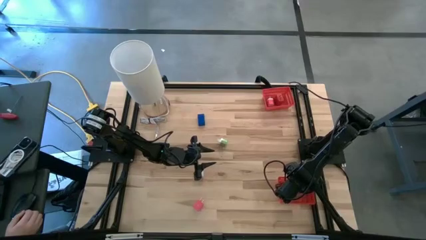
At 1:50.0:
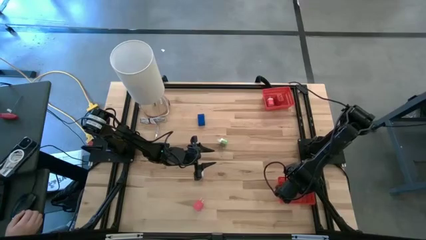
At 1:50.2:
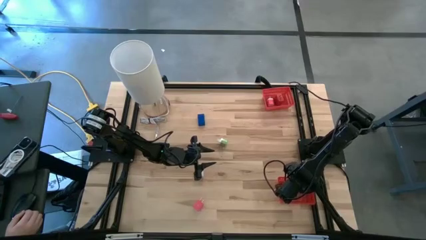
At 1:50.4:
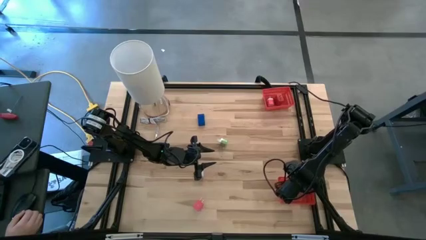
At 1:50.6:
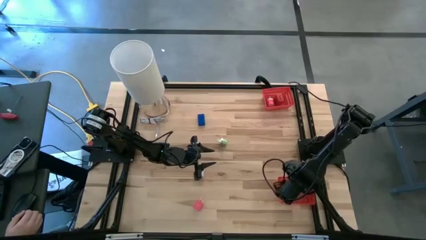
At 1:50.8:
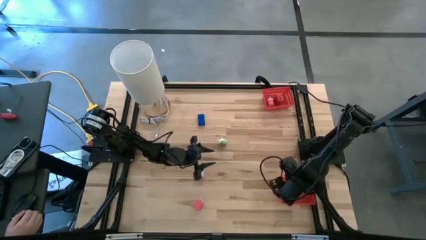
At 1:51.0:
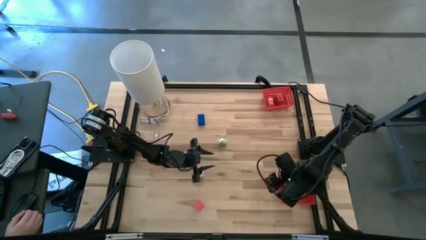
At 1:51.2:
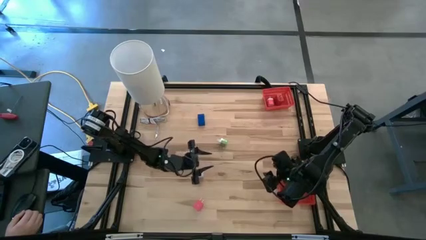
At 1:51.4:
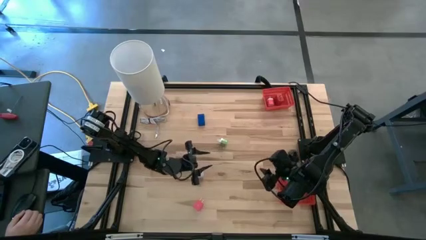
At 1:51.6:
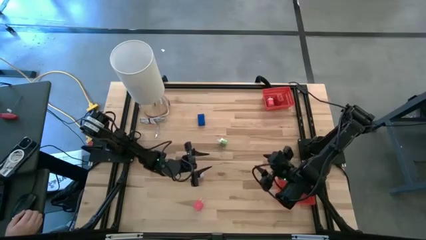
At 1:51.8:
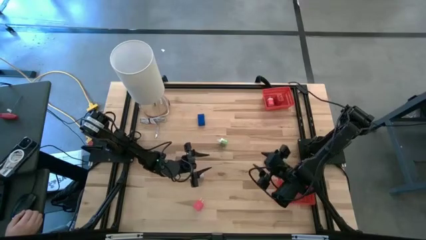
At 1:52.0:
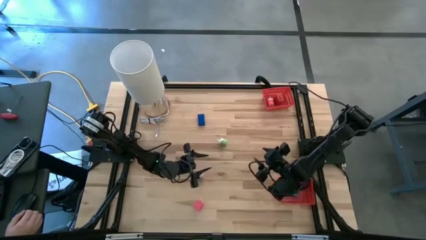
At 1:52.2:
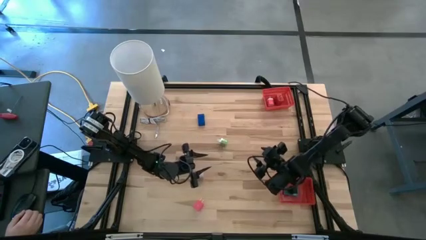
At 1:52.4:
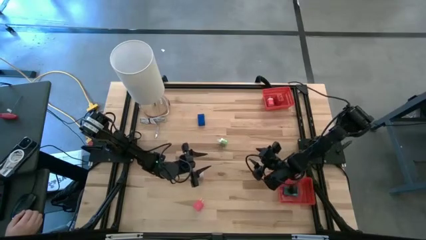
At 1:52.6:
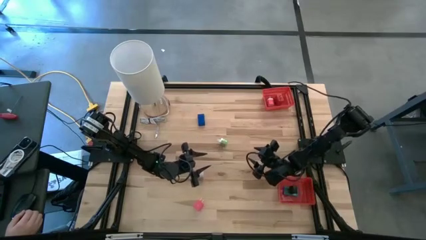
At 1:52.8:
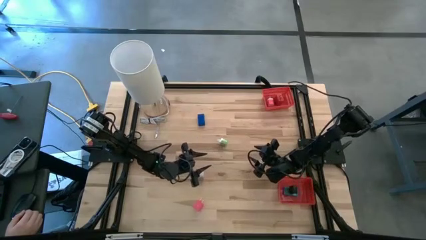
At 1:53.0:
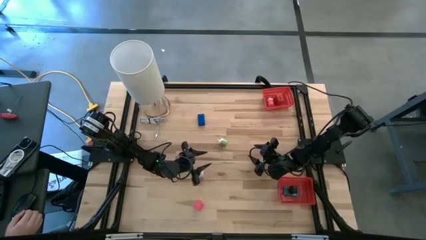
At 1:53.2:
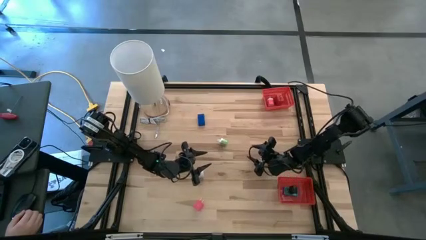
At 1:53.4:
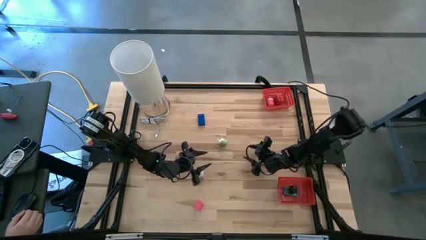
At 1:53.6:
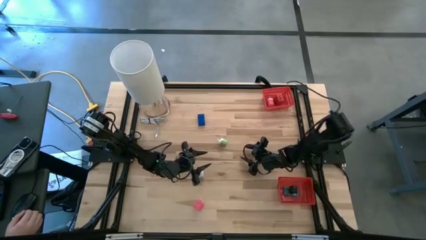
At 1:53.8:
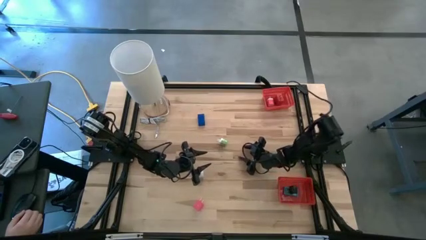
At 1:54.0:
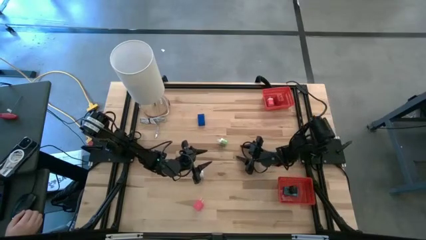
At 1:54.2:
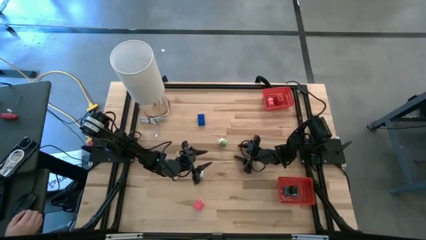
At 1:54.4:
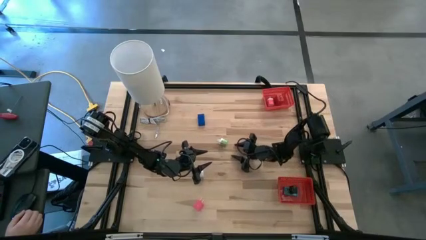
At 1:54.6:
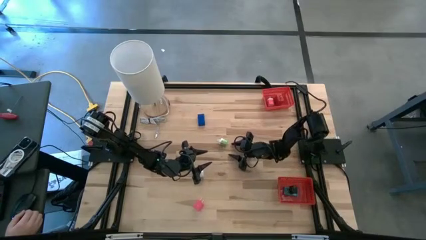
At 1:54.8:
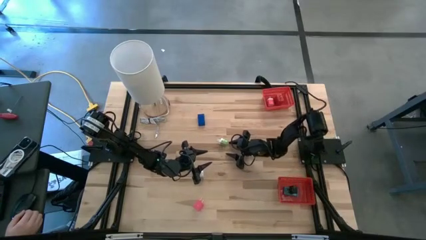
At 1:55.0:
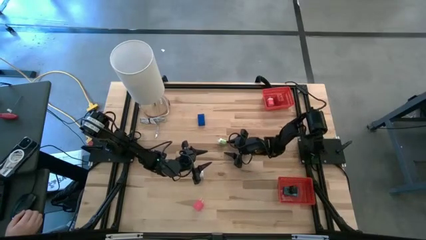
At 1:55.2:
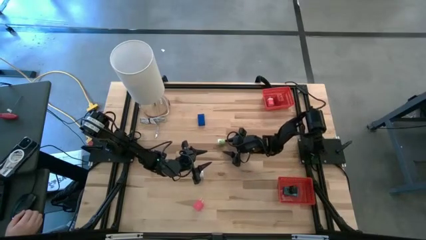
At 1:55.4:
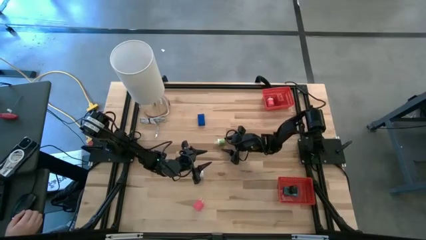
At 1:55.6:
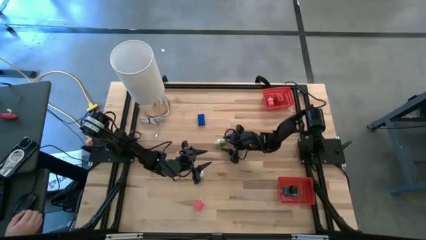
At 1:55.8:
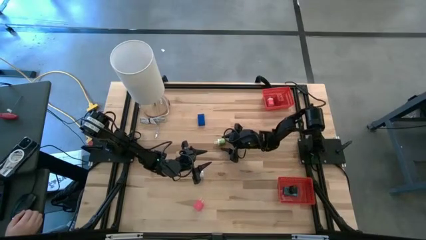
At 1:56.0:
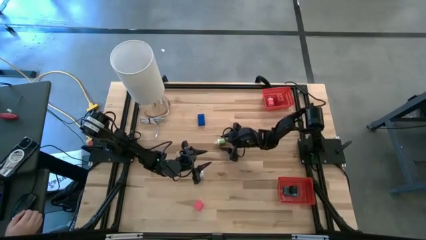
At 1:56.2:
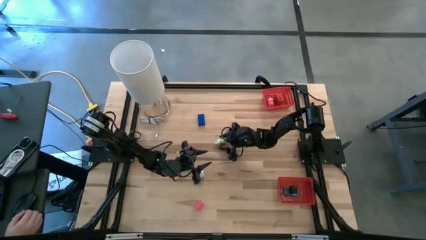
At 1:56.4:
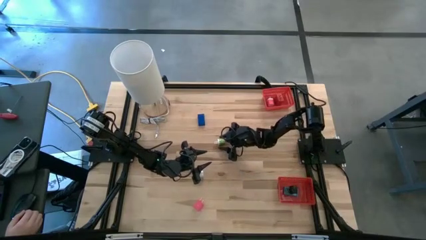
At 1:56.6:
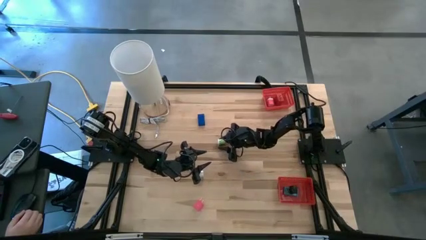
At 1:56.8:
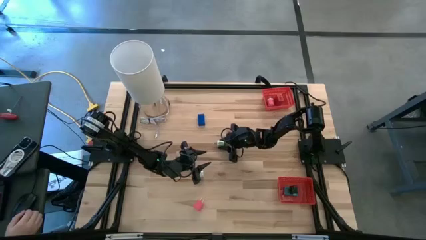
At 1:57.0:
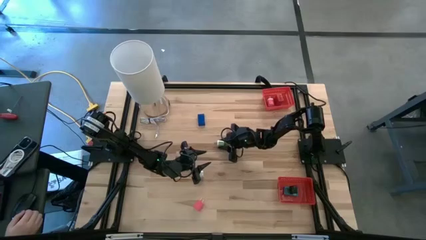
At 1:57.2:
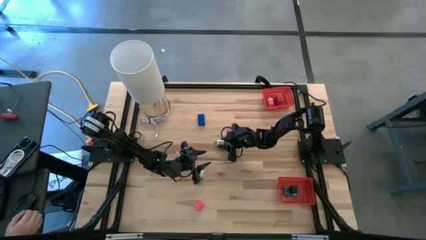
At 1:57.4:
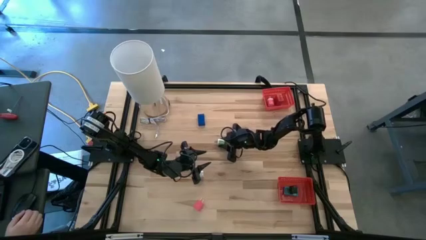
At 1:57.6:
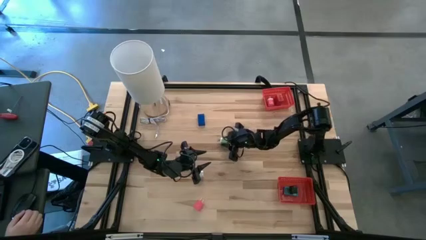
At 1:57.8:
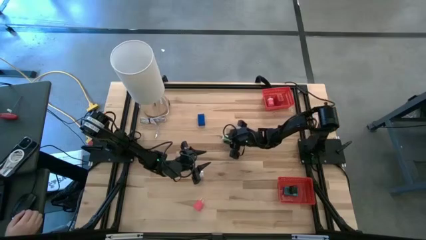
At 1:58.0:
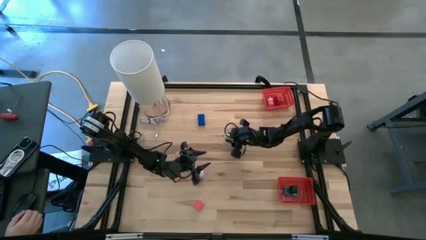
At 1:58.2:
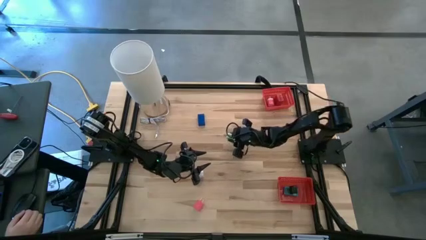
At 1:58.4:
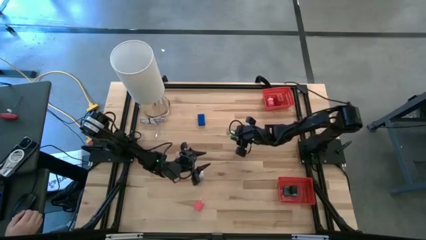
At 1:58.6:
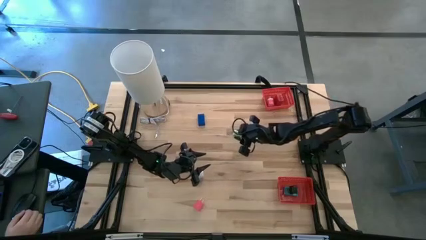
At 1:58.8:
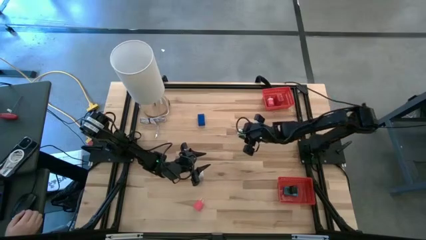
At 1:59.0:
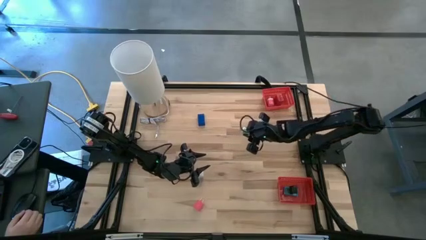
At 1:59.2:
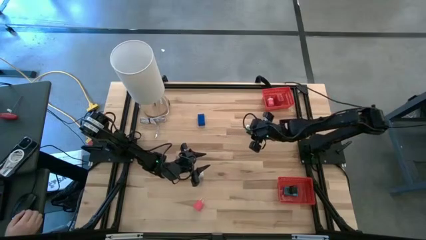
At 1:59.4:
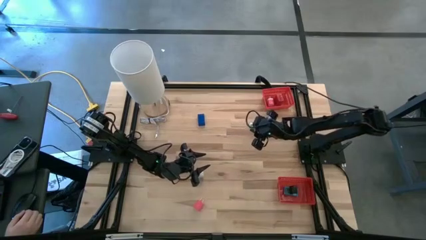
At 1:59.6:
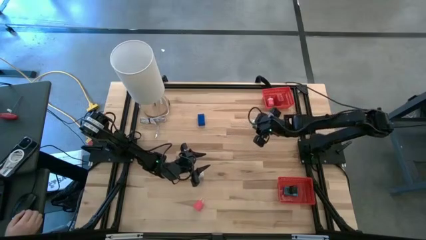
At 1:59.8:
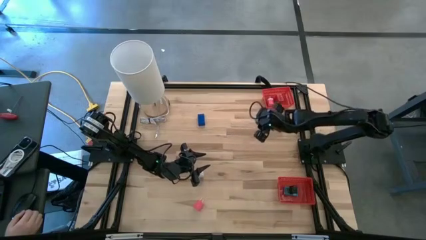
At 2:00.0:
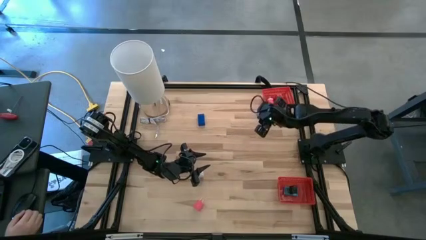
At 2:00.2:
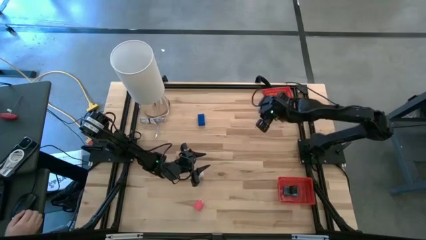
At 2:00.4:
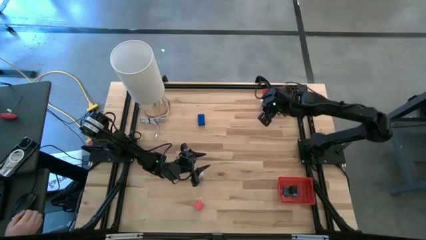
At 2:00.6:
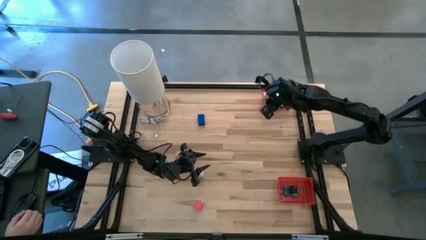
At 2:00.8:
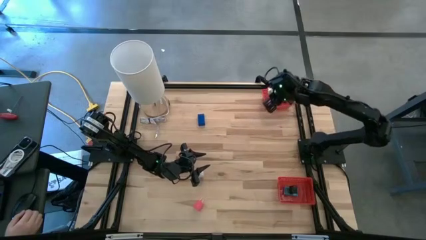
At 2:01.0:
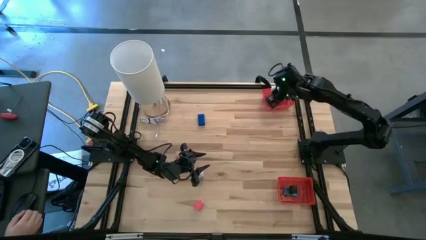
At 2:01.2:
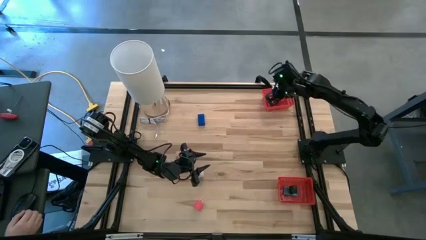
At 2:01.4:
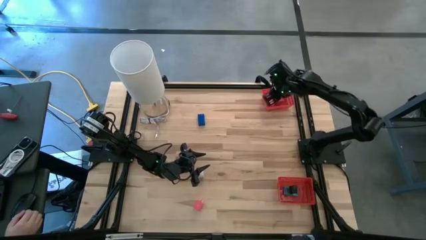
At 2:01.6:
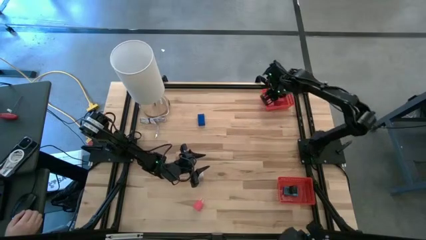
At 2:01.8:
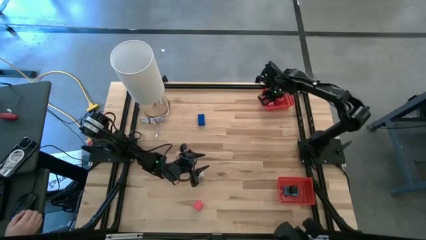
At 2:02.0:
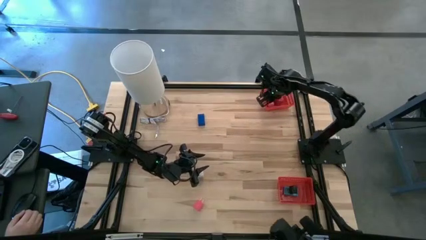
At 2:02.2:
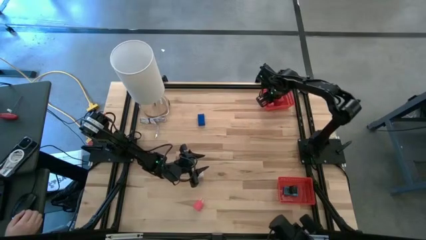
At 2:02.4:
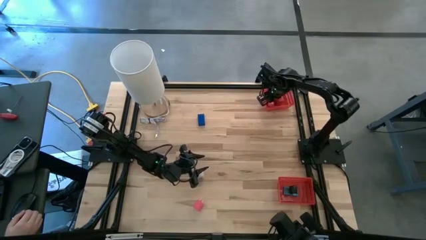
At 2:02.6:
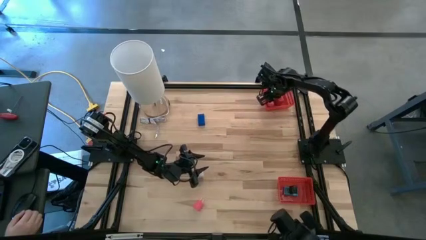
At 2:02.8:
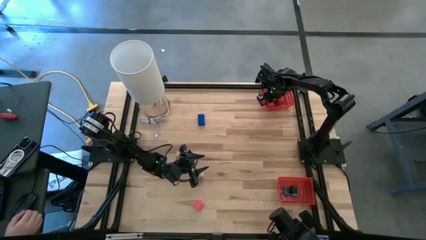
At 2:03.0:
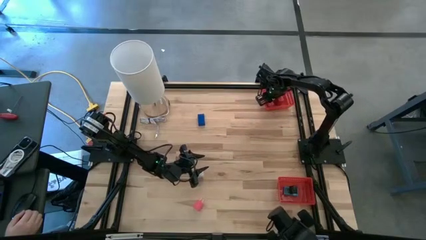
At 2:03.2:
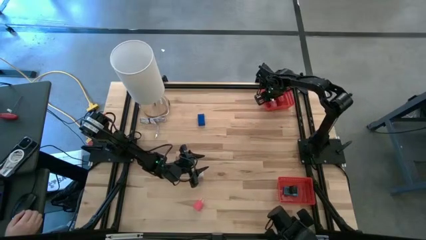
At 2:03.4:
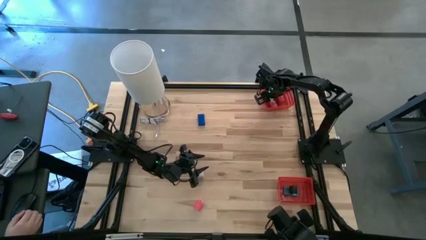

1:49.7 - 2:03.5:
Task: Pick & Place Office items
Put the green charger adapter into the top red basket
